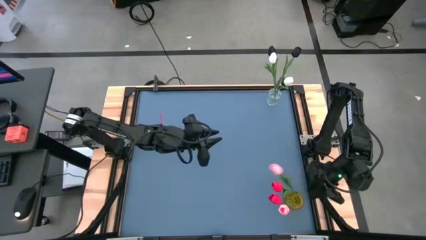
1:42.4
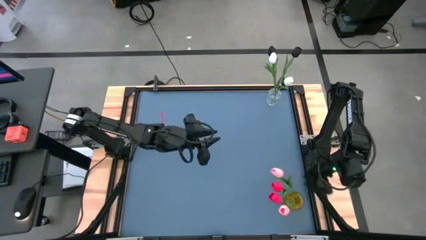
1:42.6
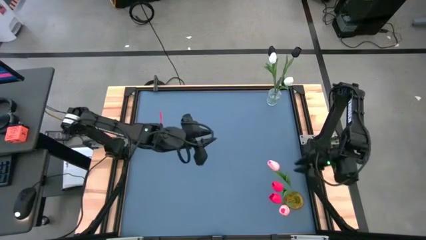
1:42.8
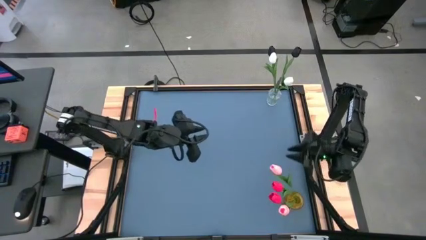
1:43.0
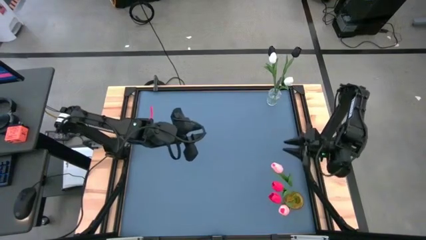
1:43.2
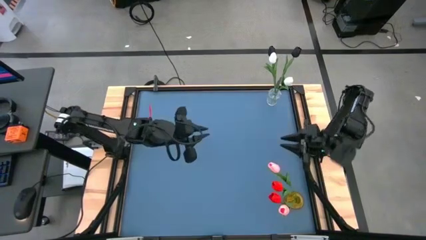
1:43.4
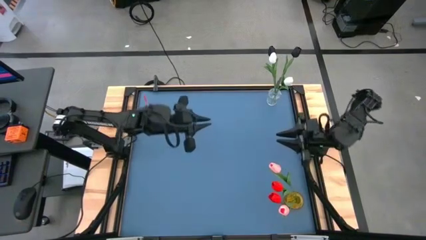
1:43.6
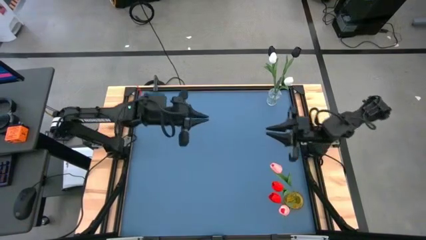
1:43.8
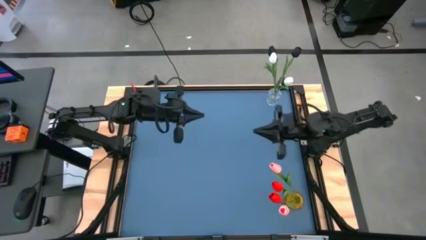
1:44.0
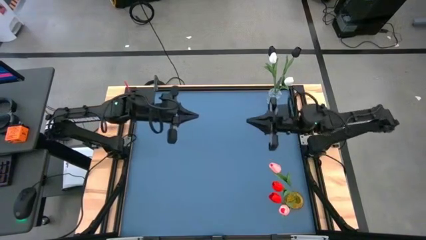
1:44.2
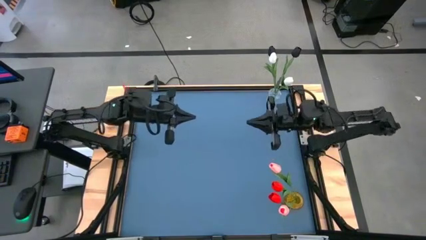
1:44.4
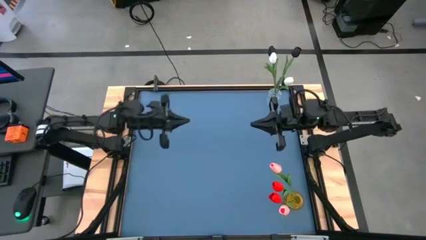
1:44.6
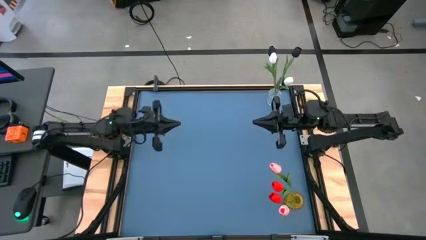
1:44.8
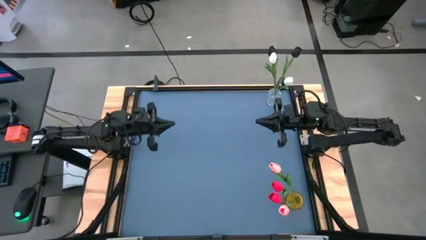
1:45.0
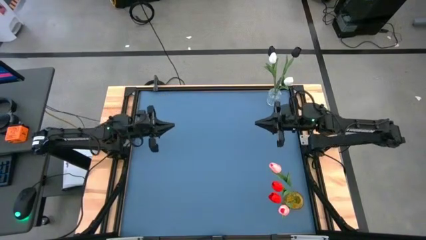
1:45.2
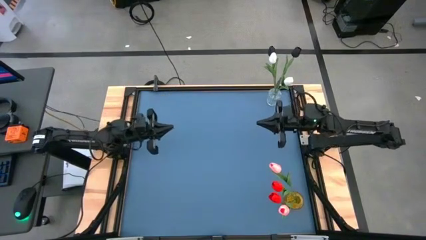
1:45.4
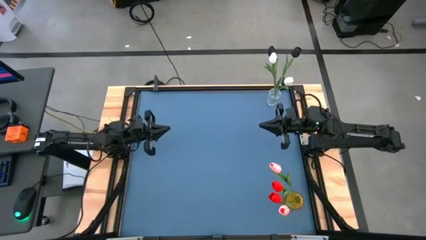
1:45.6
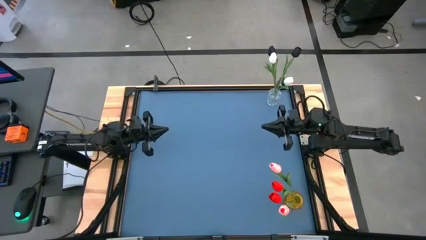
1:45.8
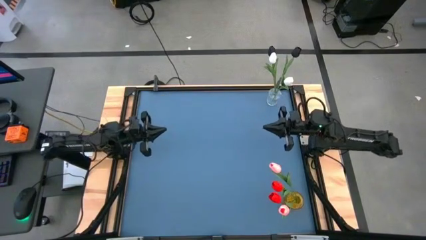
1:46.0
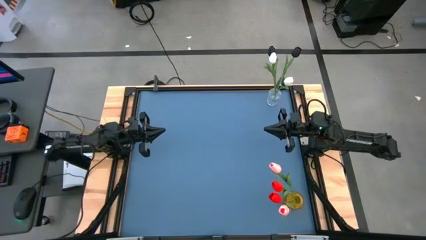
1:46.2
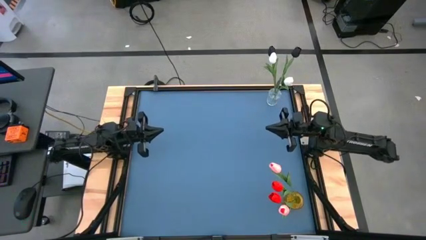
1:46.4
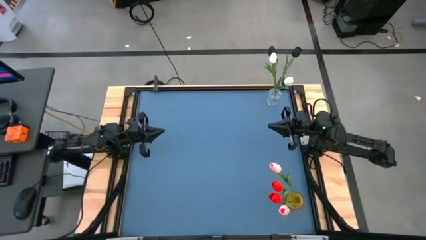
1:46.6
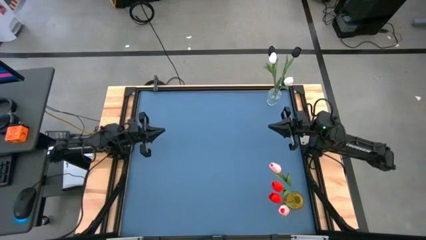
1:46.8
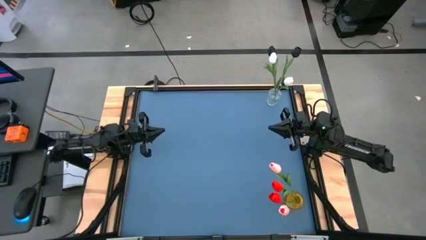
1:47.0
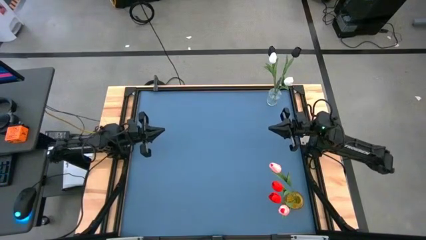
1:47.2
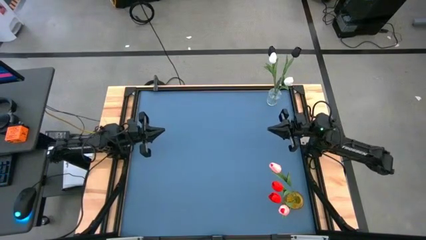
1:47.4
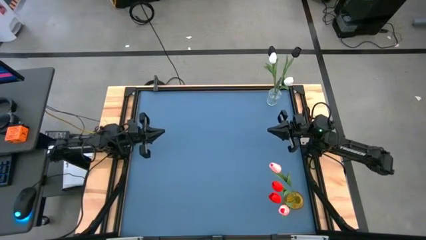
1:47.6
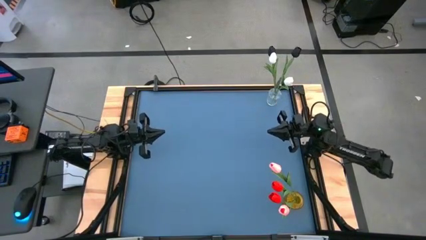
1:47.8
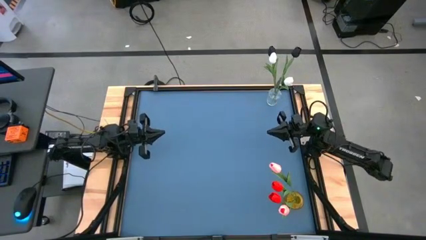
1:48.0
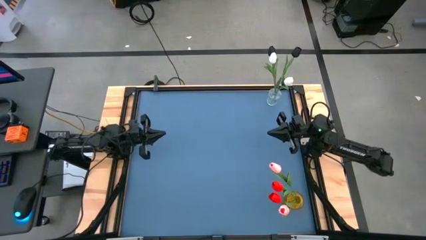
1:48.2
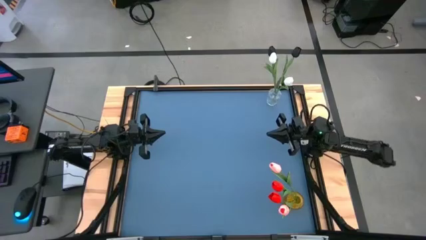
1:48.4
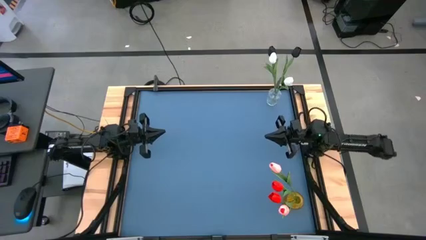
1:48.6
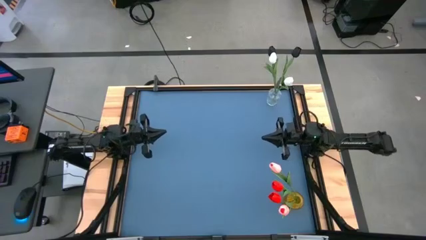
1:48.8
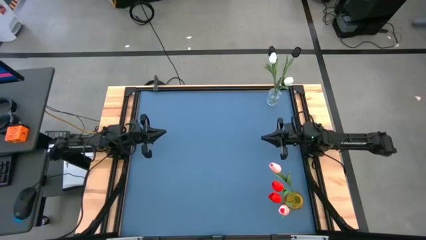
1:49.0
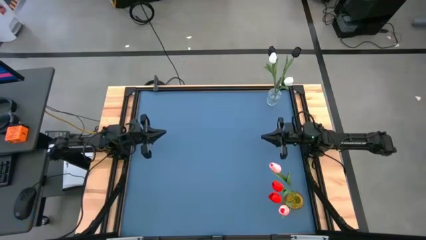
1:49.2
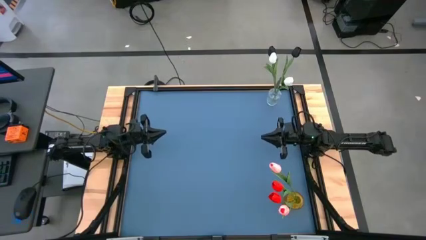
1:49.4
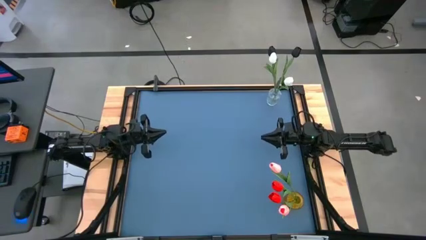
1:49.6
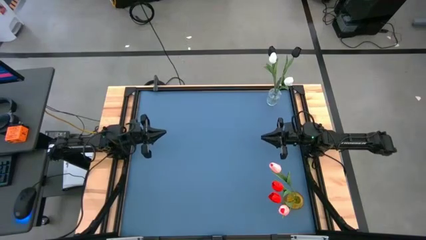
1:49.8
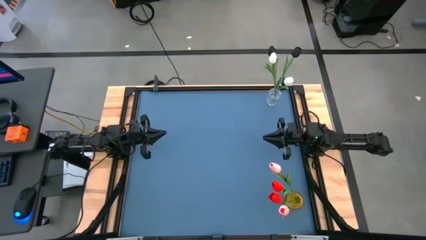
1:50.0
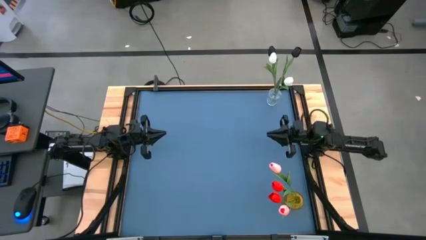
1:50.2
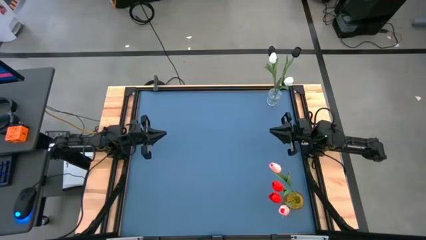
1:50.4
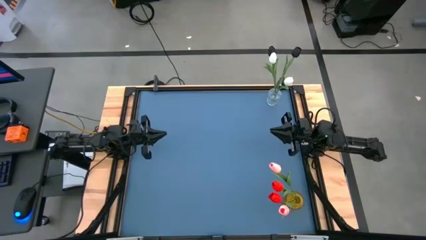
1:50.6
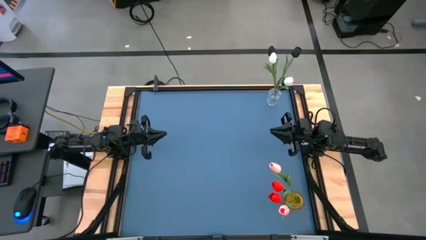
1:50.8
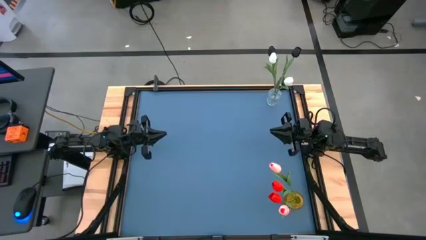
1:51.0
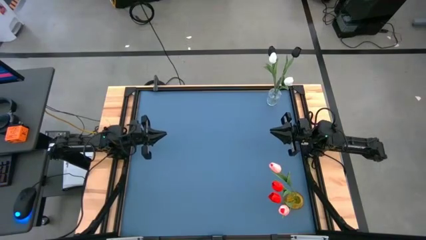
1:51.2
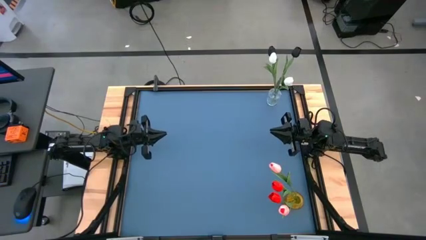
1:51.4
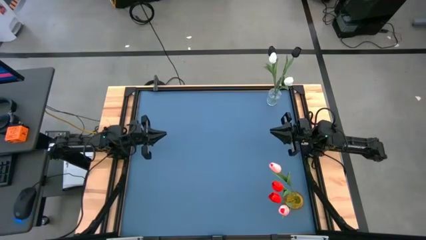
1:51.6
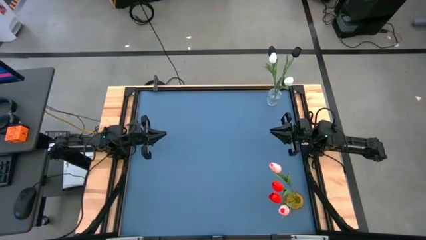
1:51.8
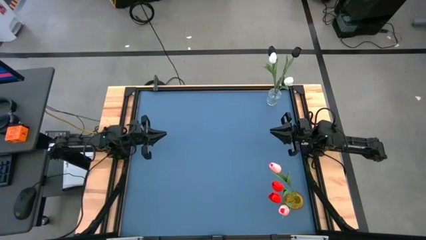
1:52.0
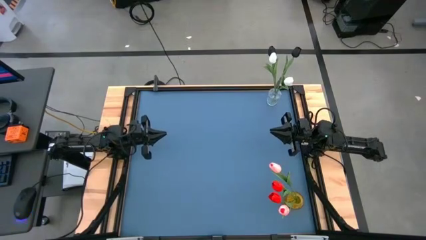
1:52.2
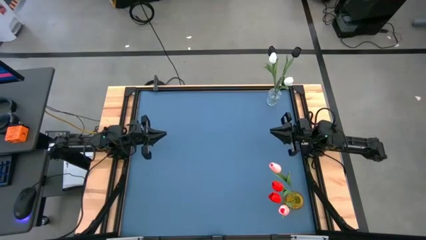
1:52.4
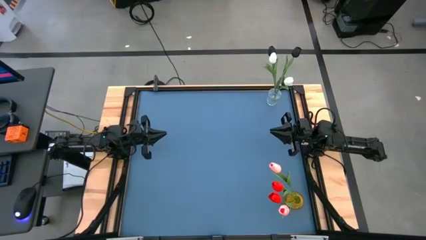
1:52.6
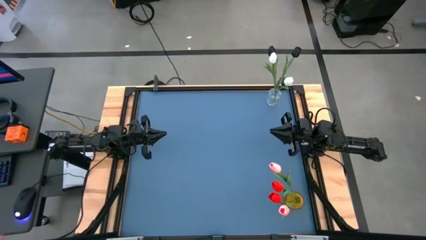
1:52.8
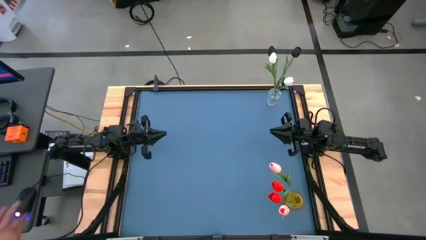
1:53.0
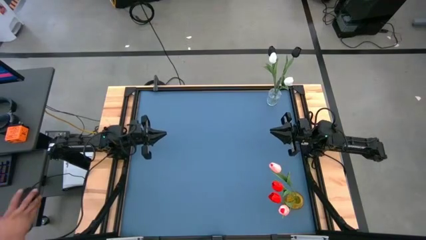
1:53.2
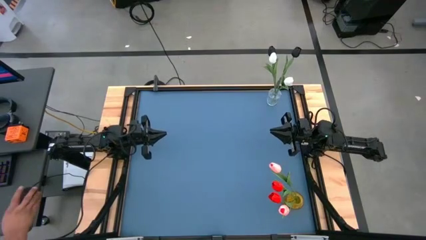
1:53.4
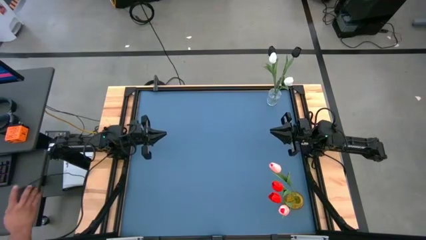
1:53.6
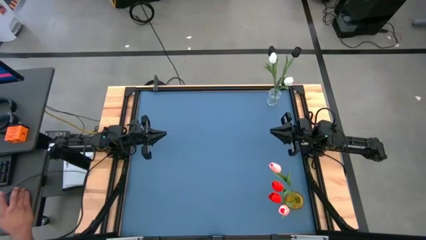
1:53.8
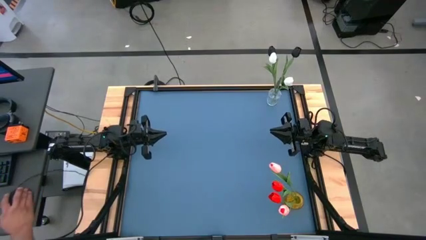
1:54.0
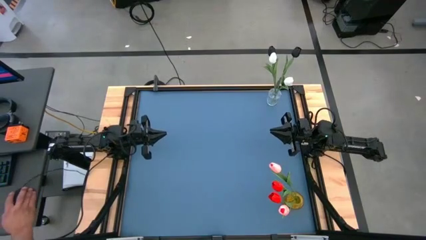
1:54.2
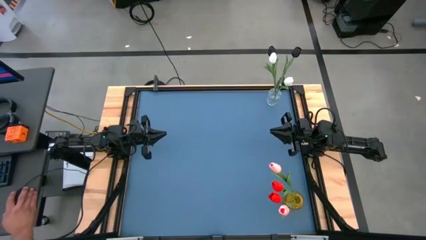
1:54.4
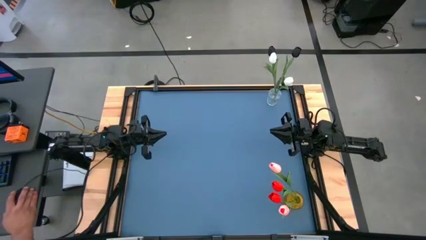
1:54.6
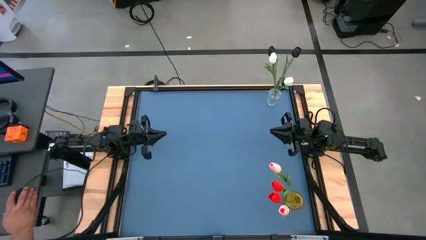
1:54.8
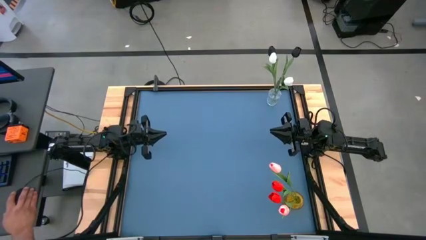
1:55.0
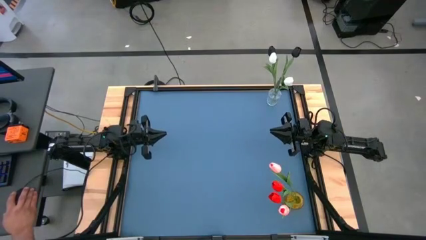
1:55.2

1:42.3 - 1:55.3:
Task: Sort flowers into vase by color
Return to Home Position
